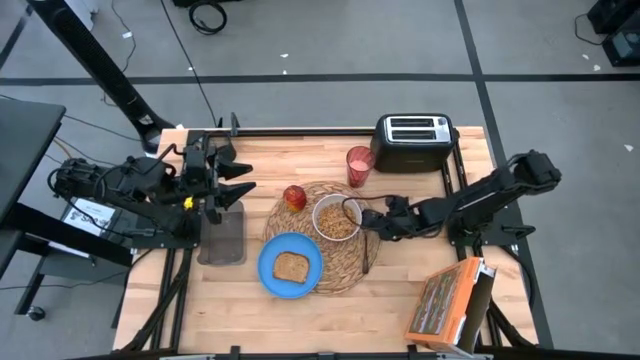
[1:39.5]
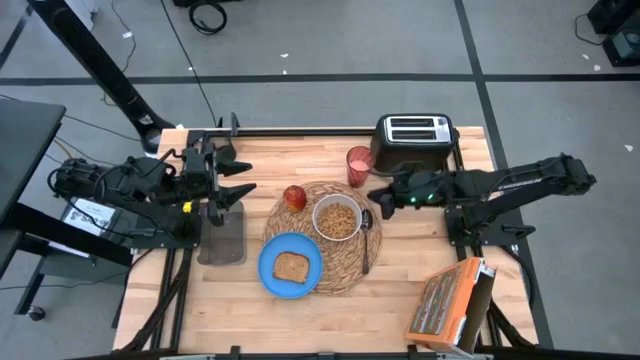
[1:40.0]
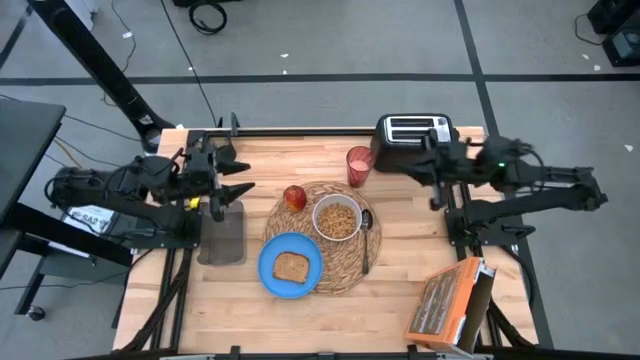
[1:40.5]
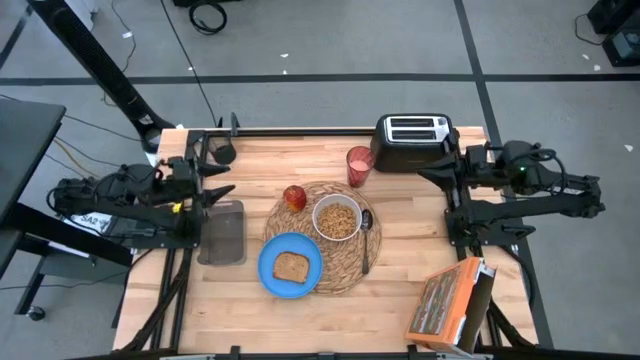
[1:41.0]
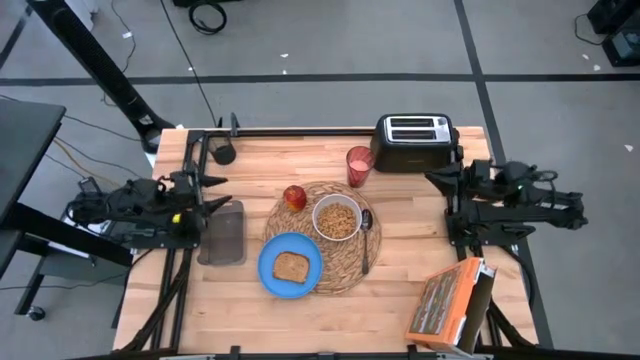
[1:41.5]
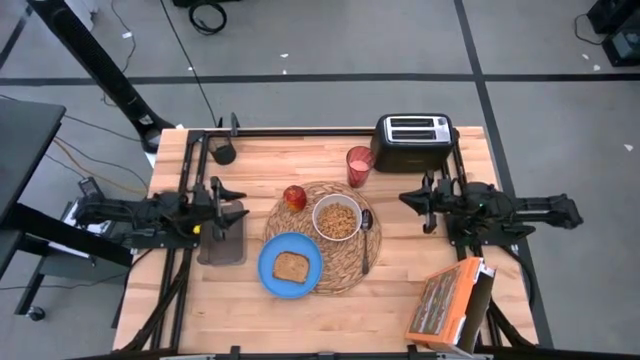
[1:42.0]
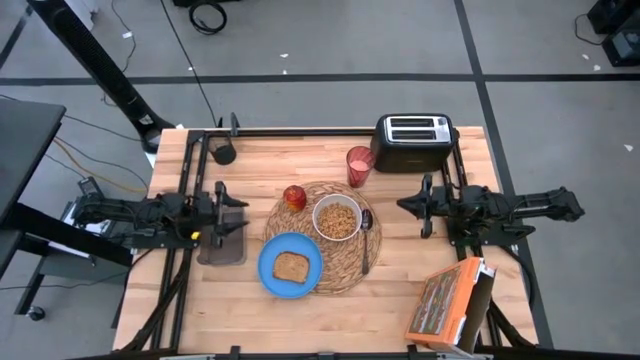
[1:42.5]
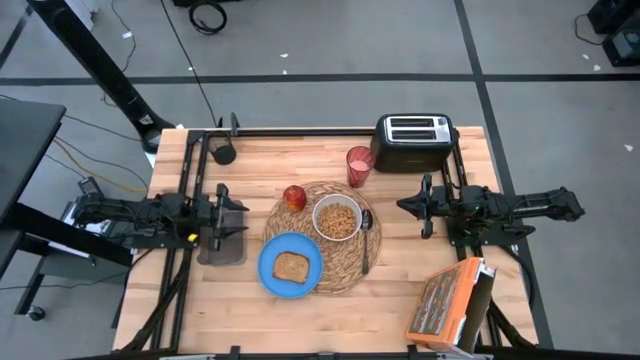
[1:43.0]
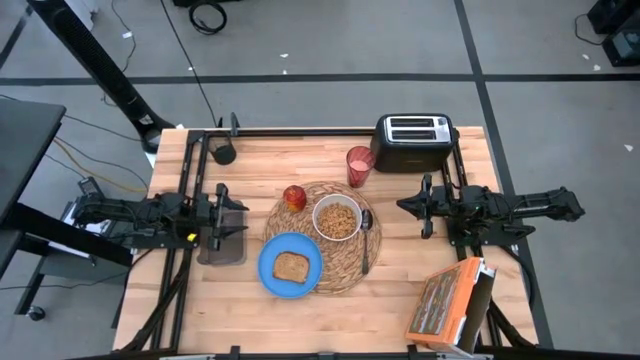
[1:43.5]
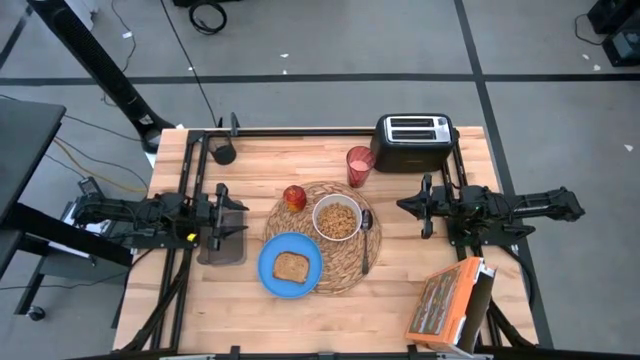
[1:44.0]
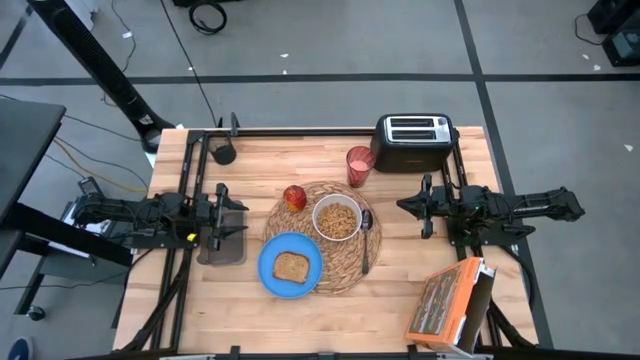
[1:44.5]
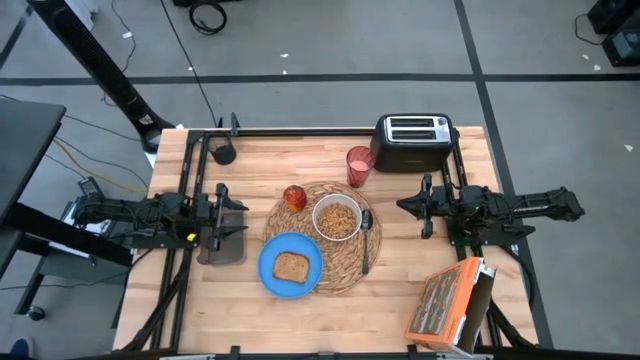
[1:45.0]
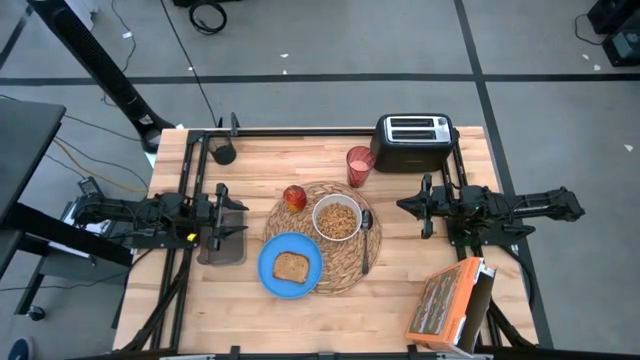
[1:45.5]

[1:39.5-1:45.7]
Task: Arrange a breakfast setting
Return to Home Position

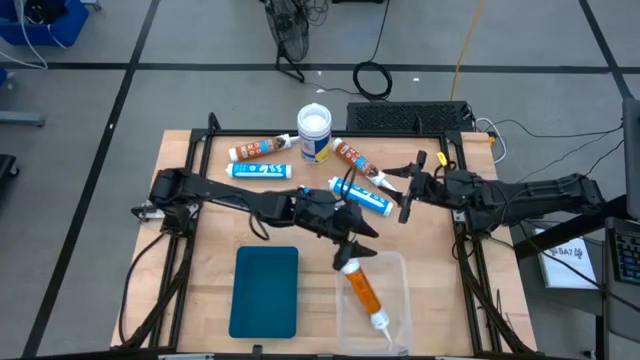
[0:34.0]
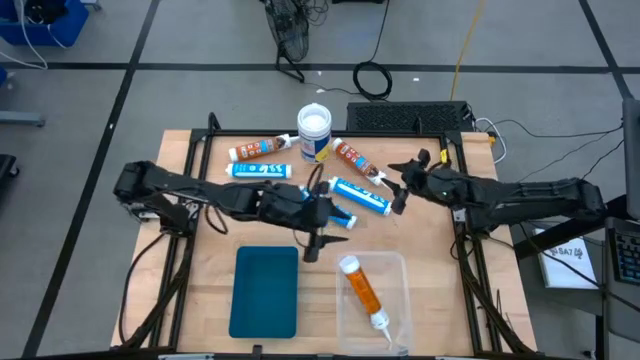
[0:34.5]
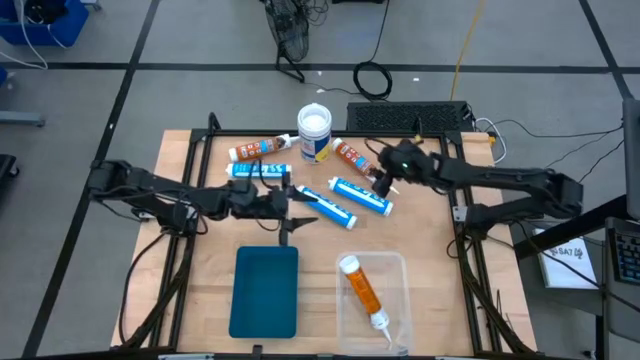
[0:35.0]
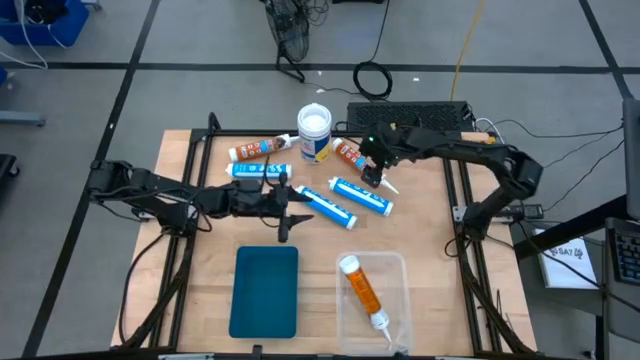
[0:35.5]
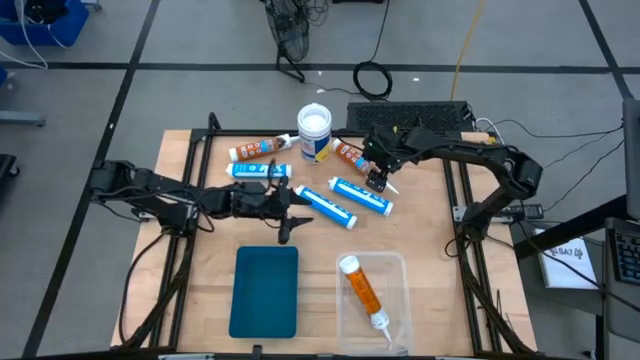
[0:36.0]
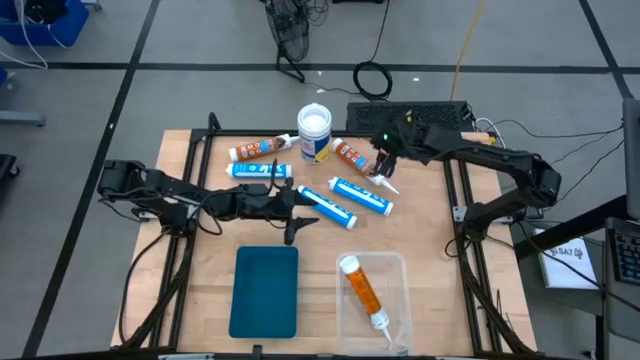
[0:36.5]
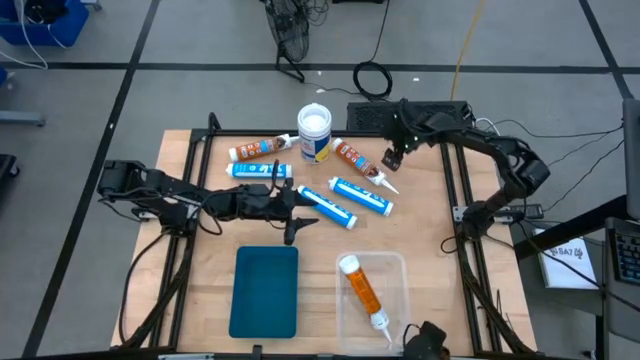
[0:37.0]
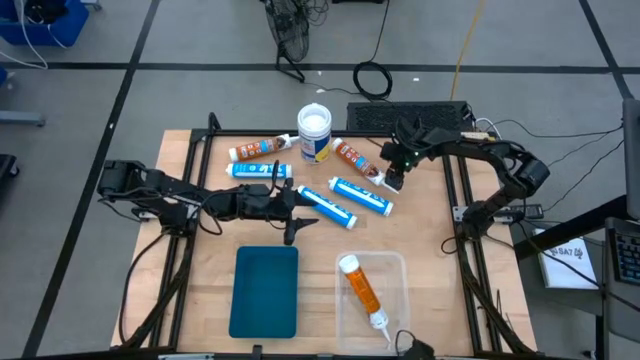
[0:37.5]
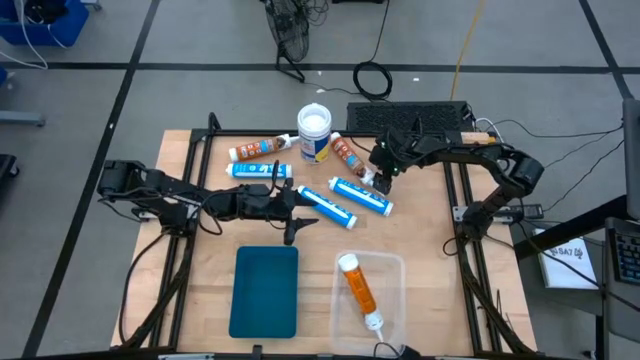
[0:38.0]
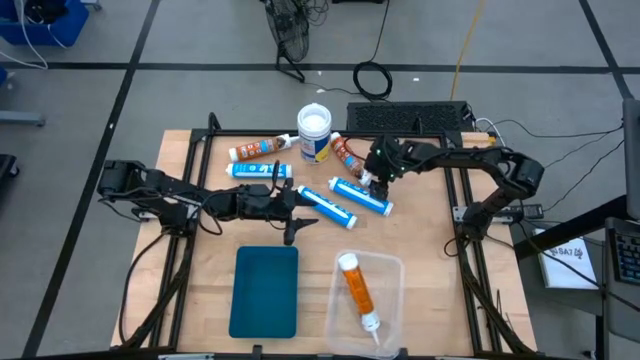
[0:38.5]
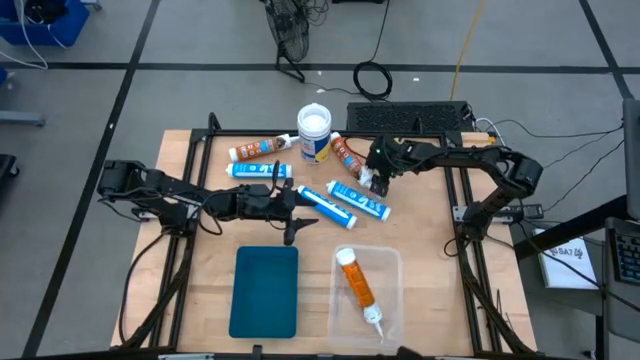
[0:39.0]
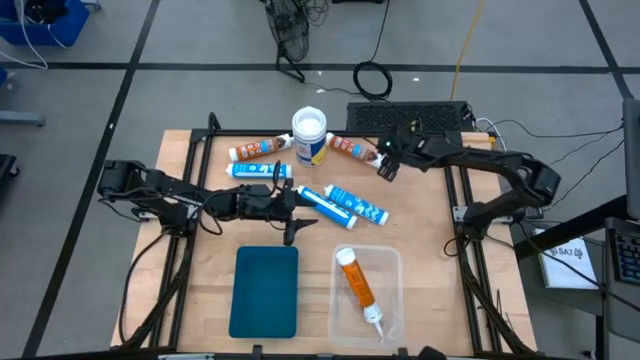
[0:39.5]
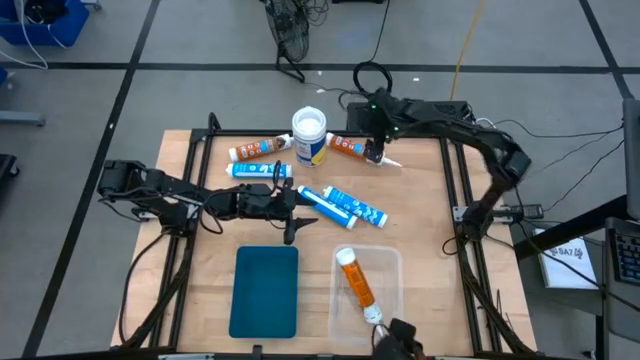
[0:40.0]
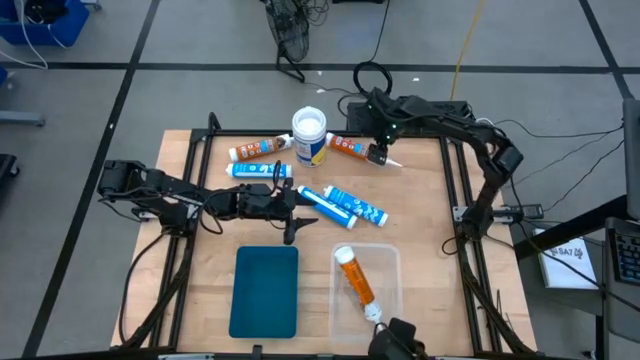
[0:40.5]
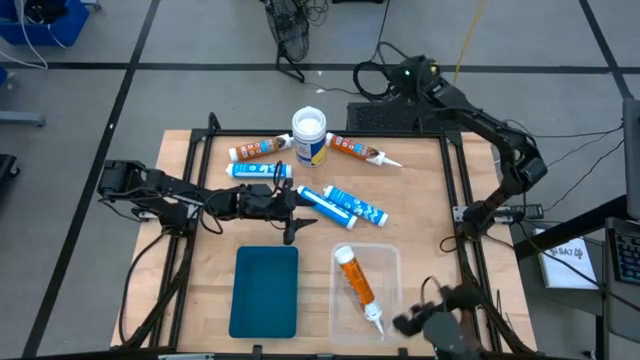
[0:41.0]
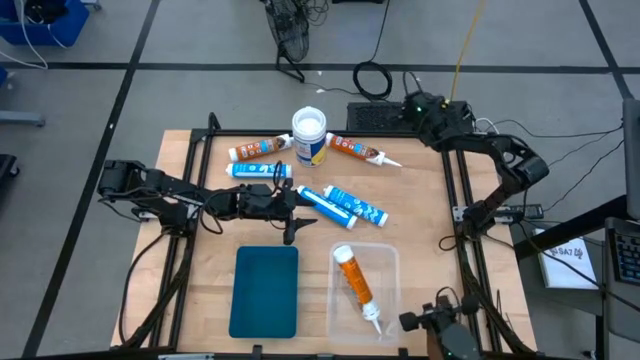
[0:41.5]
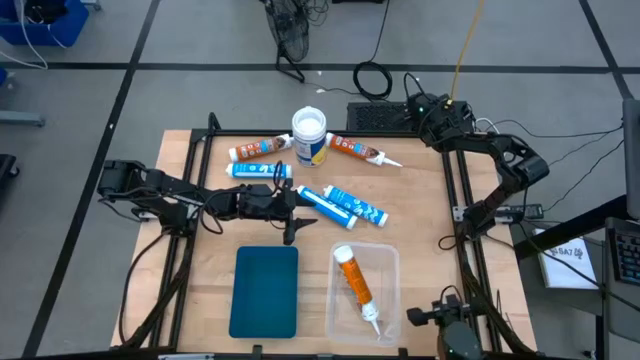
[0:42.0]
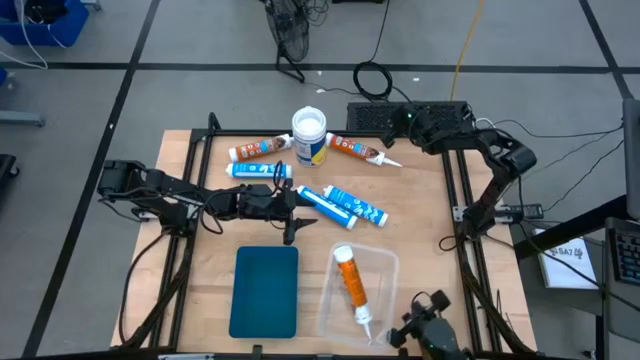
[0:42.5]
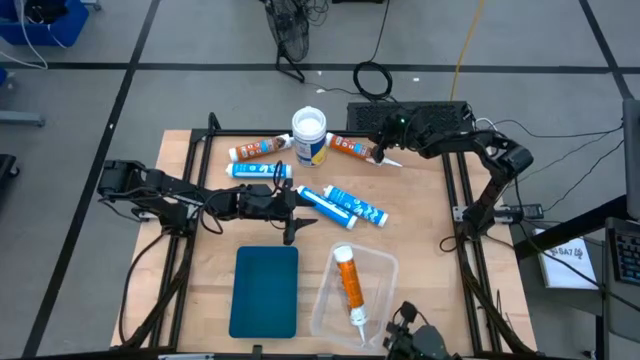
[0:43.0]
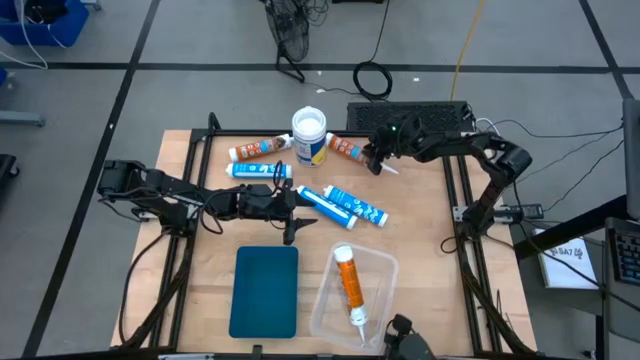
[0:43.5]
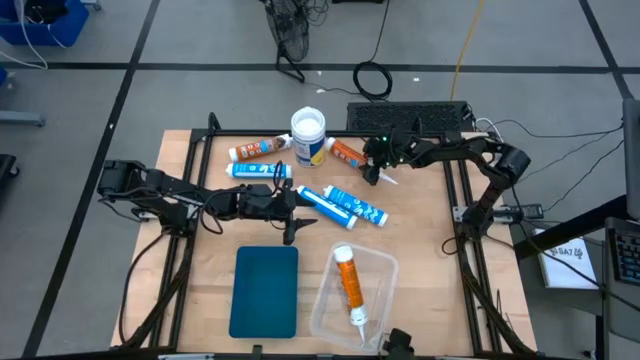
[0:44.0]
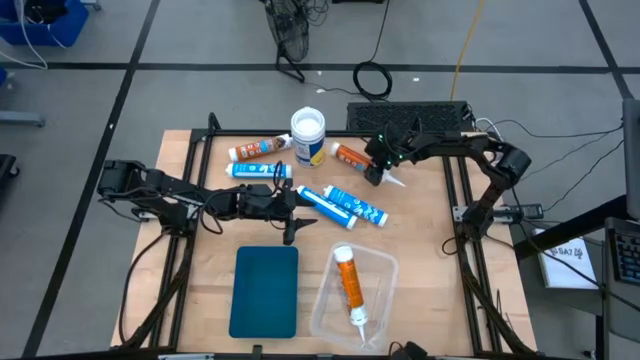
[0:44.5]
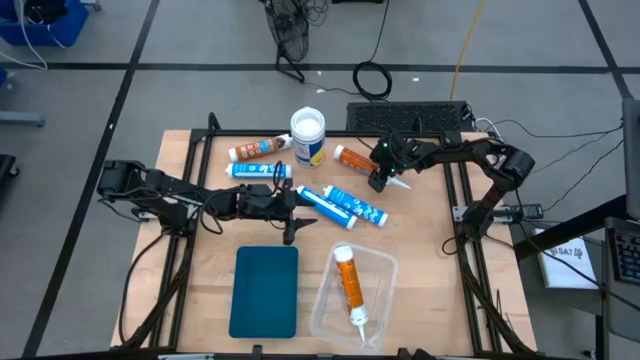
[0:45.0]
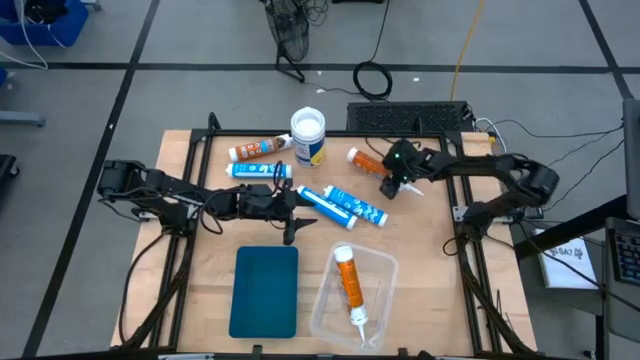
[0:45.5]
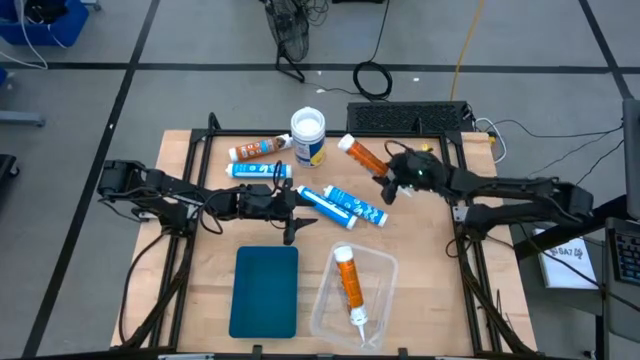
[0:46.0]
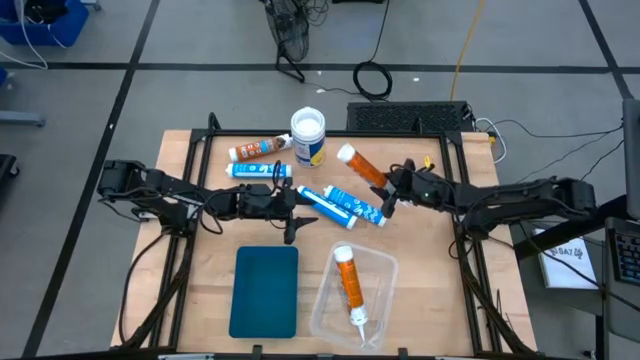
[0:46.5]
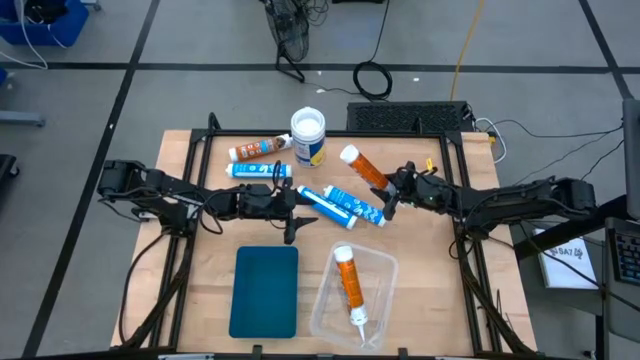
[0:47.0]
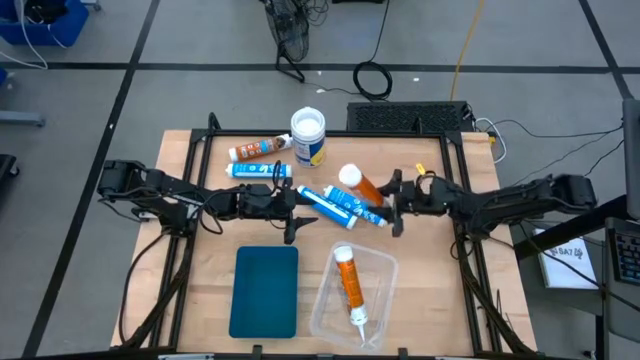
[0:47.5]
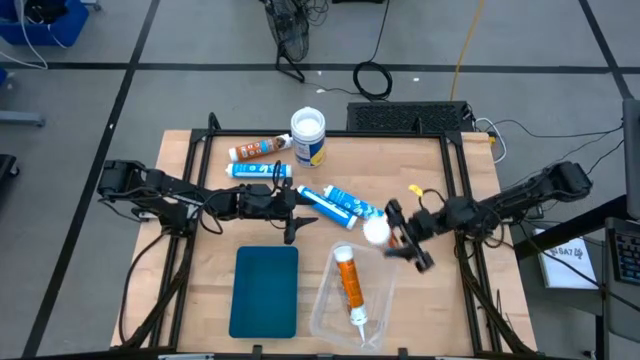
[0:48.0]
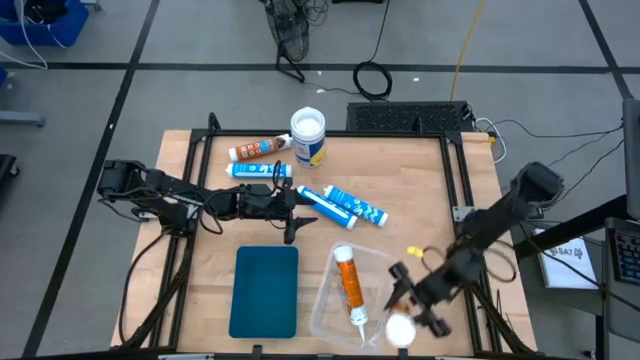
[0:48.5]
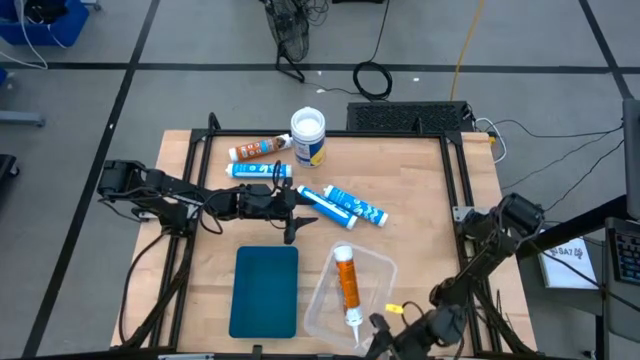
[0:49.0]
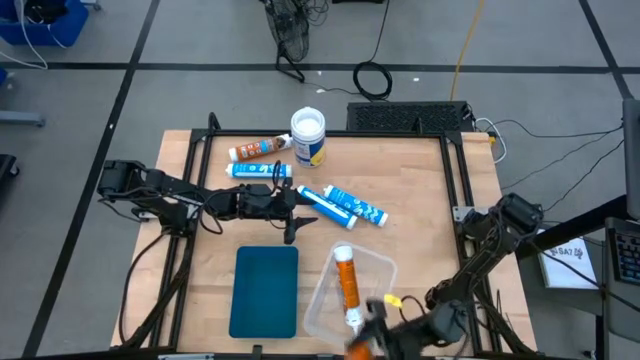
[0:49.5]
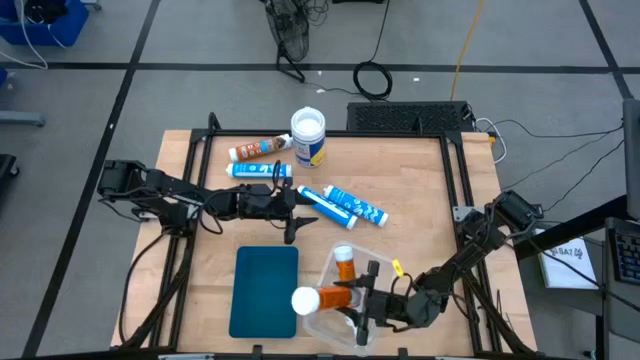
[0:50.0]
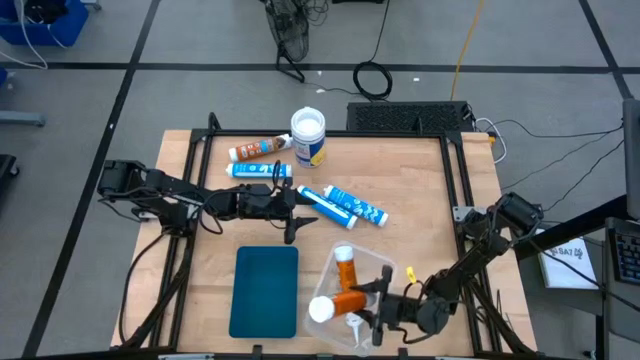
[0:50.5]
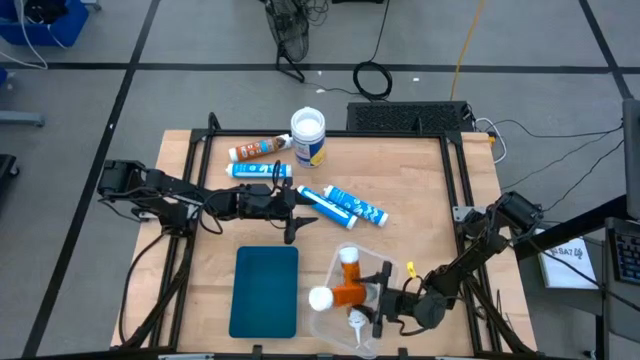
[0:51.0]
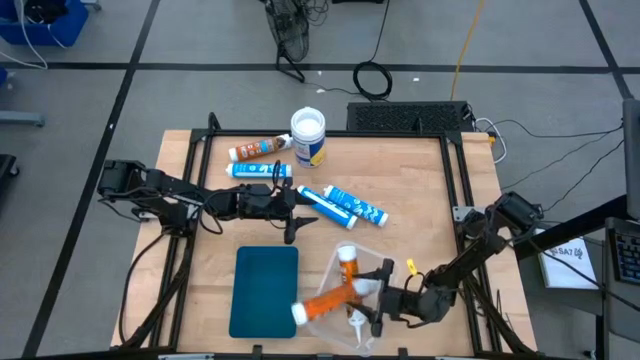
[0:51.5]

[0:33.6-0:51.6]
Task: Pick & place silicon tubes, Sealant and Lysol wipes
Put the right orange sealant into the white bin
